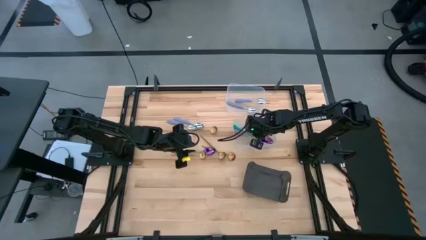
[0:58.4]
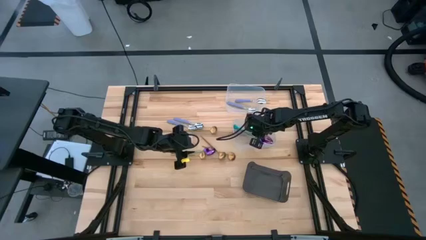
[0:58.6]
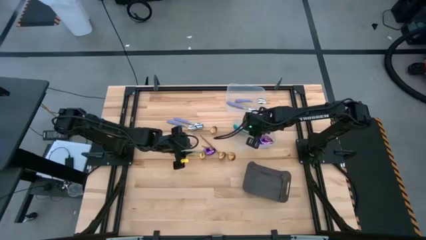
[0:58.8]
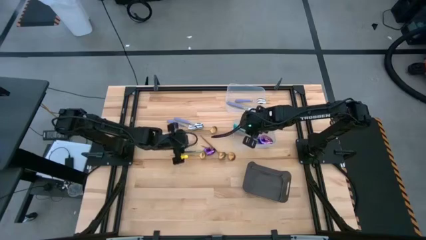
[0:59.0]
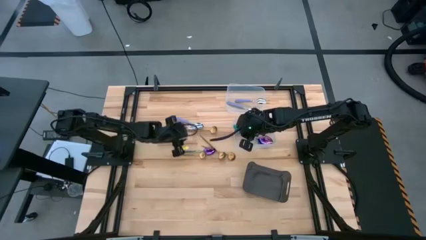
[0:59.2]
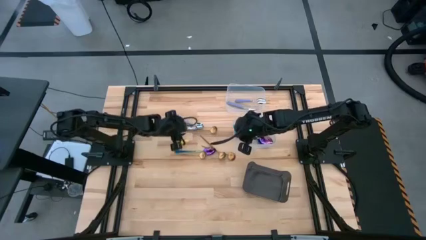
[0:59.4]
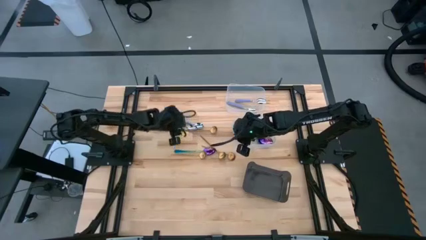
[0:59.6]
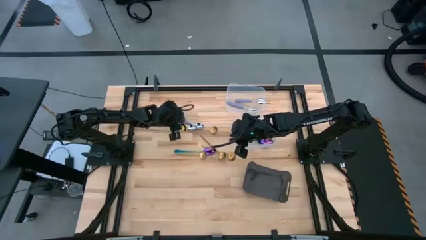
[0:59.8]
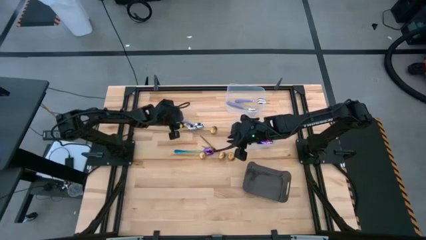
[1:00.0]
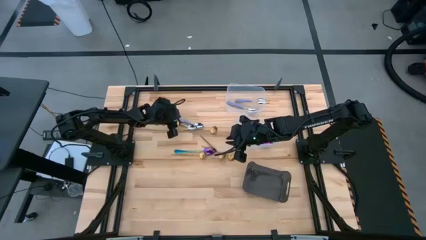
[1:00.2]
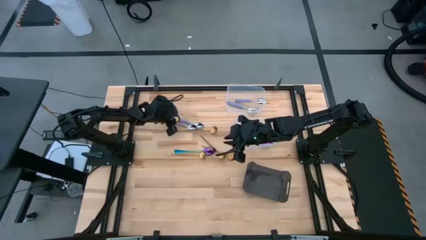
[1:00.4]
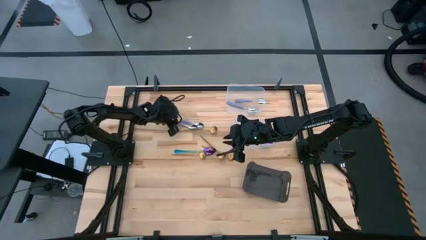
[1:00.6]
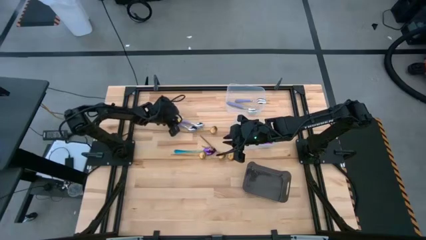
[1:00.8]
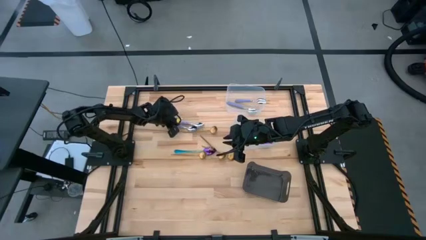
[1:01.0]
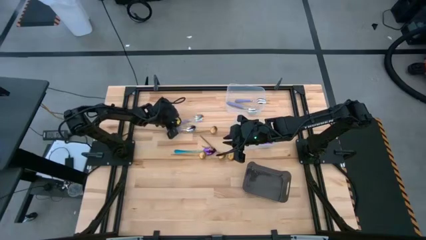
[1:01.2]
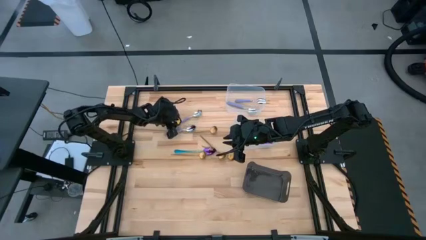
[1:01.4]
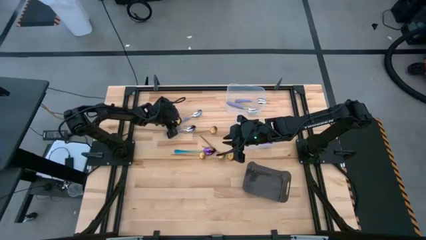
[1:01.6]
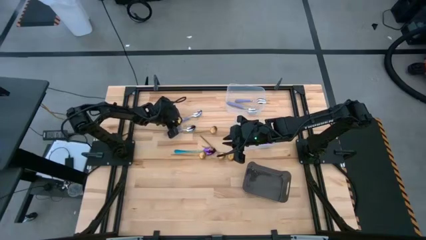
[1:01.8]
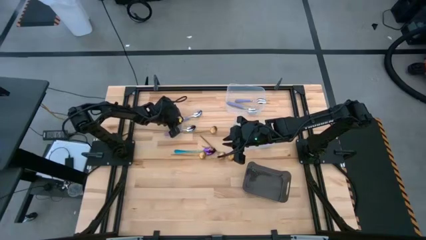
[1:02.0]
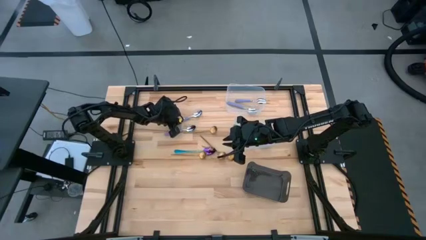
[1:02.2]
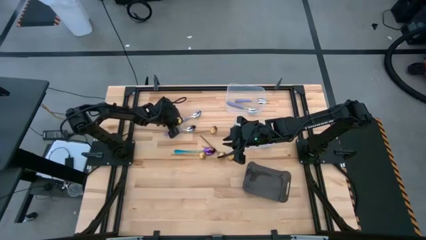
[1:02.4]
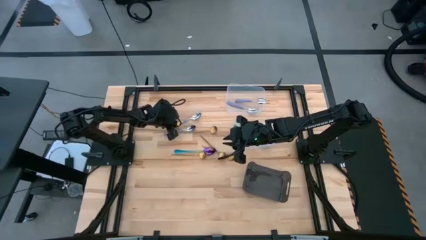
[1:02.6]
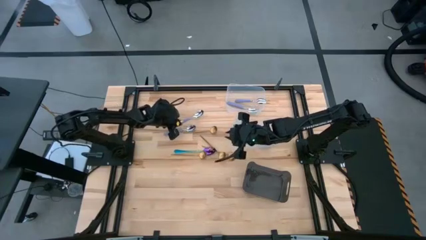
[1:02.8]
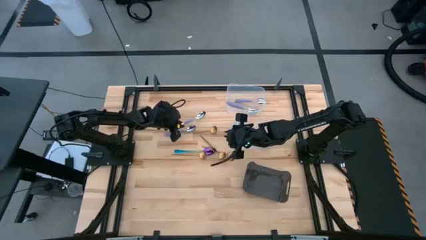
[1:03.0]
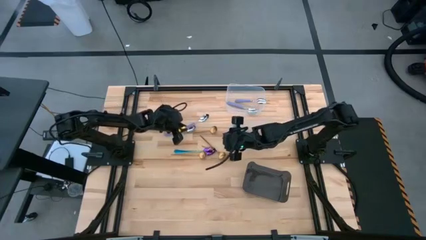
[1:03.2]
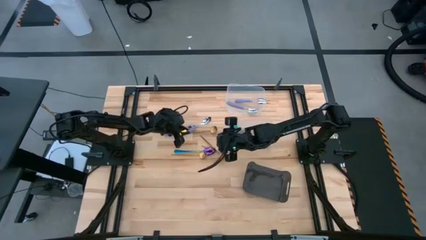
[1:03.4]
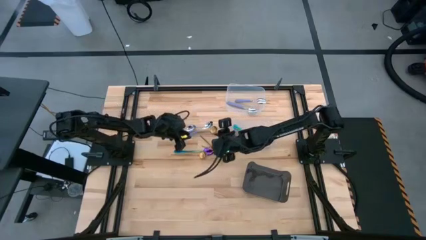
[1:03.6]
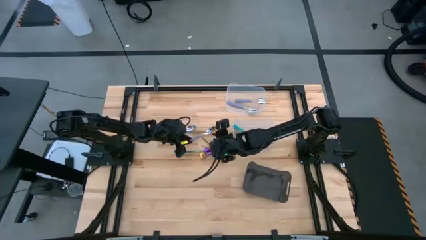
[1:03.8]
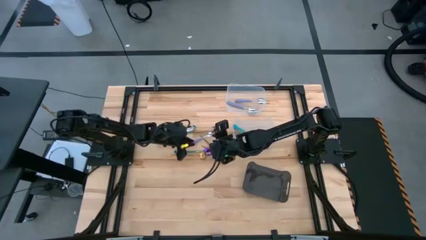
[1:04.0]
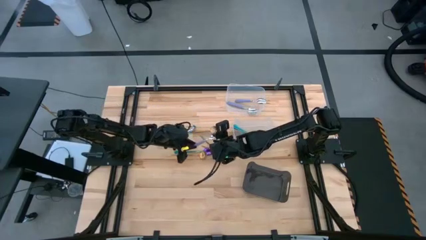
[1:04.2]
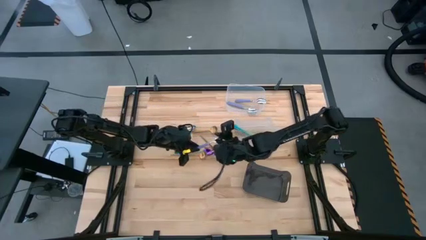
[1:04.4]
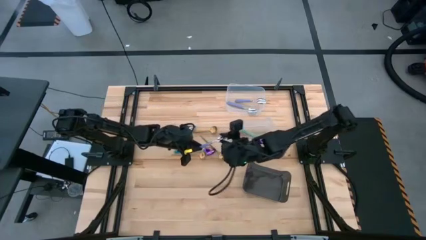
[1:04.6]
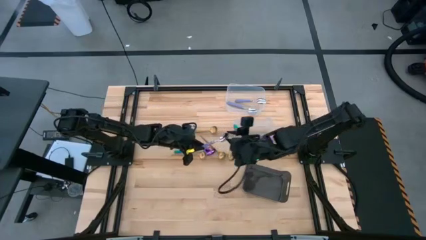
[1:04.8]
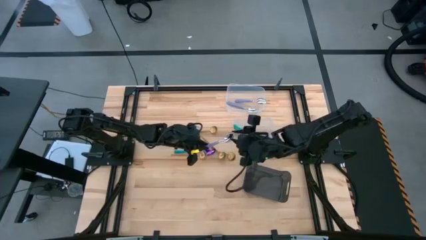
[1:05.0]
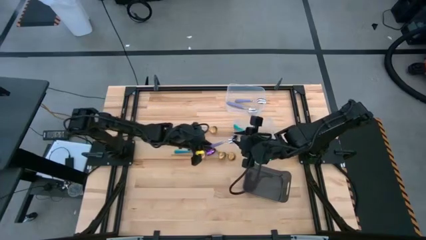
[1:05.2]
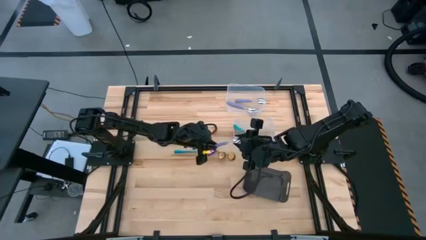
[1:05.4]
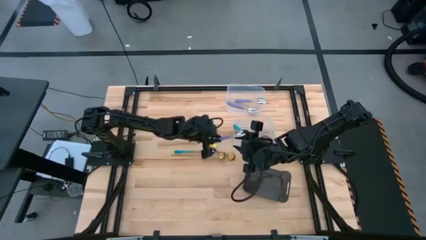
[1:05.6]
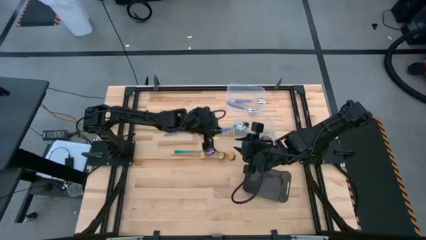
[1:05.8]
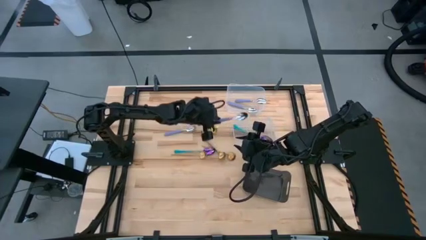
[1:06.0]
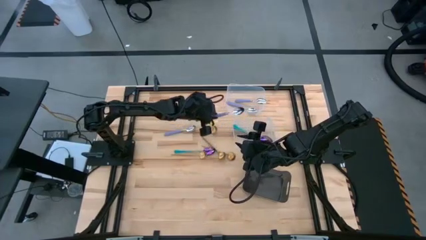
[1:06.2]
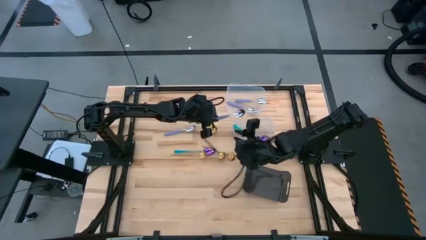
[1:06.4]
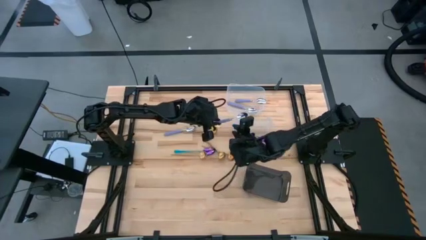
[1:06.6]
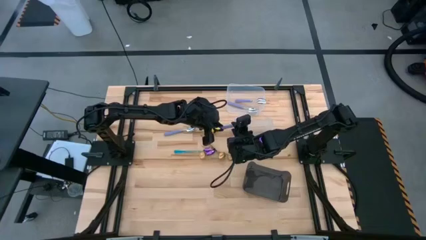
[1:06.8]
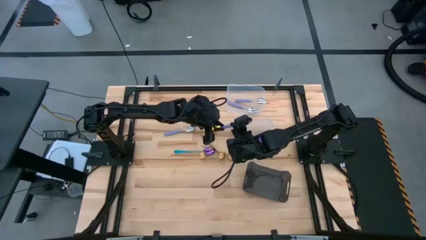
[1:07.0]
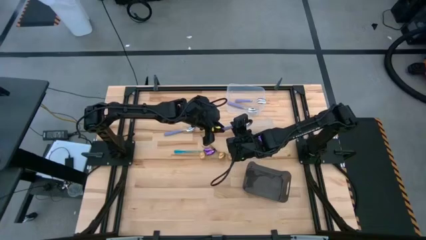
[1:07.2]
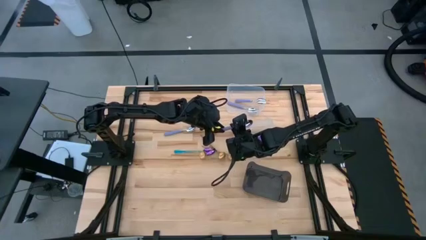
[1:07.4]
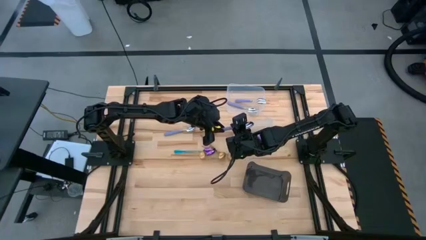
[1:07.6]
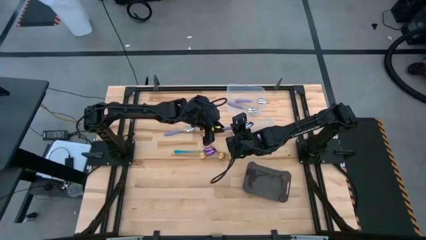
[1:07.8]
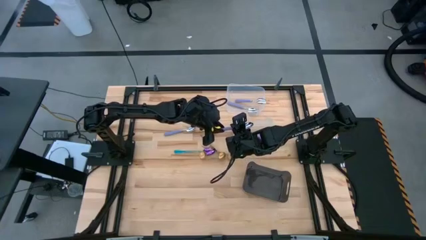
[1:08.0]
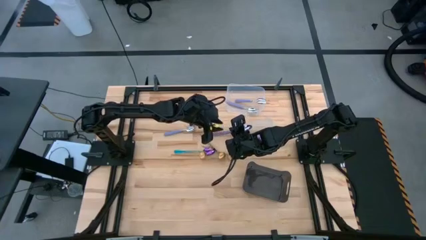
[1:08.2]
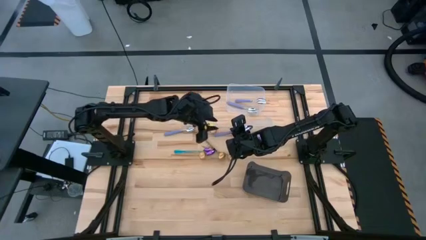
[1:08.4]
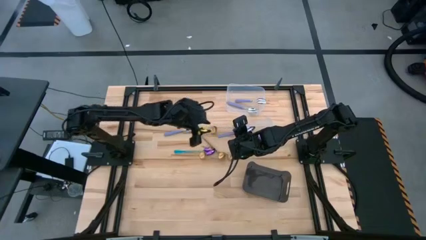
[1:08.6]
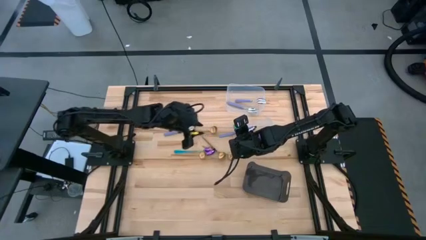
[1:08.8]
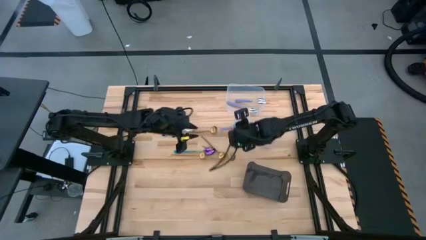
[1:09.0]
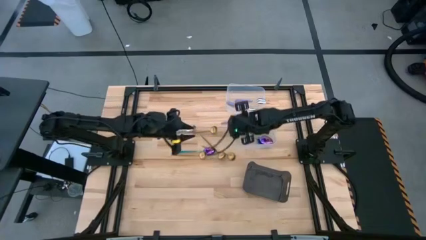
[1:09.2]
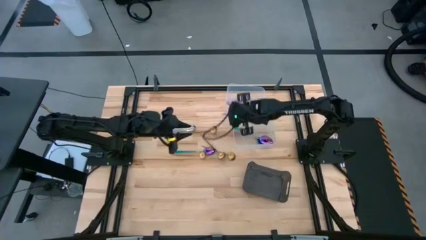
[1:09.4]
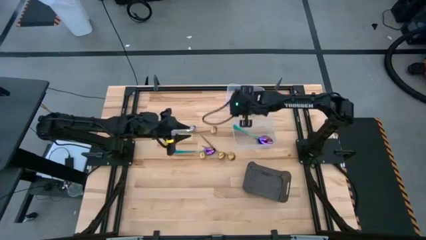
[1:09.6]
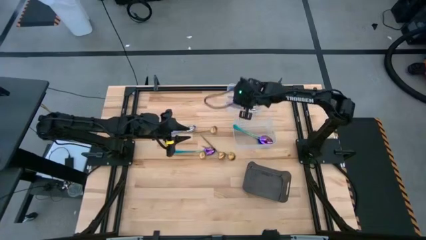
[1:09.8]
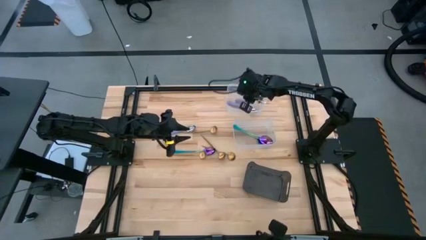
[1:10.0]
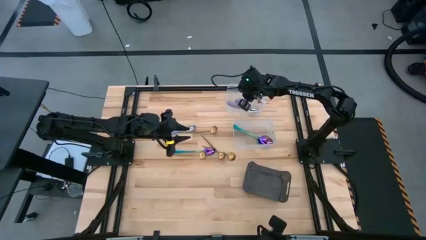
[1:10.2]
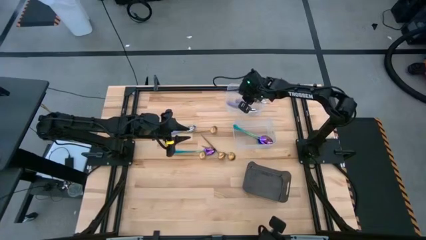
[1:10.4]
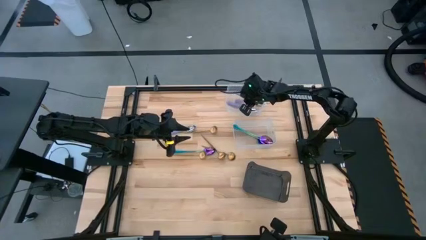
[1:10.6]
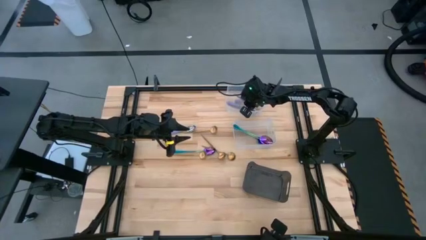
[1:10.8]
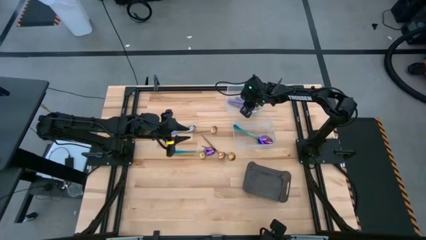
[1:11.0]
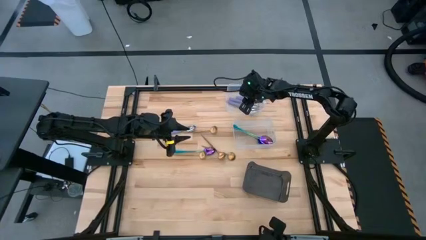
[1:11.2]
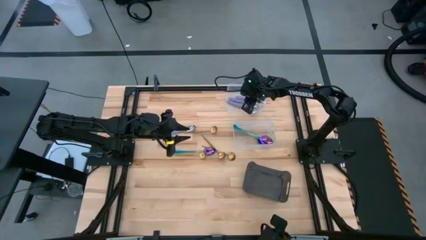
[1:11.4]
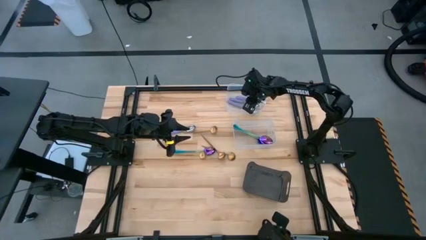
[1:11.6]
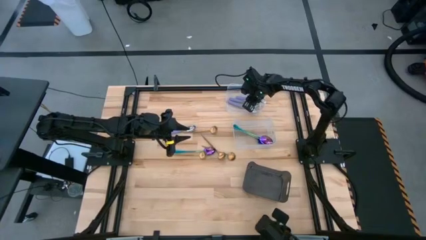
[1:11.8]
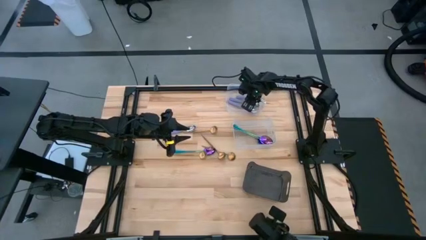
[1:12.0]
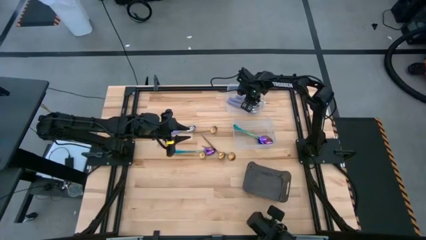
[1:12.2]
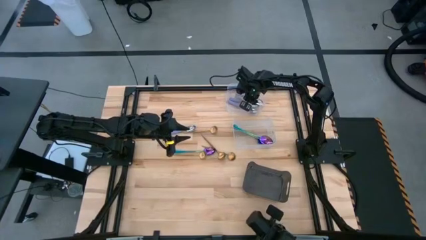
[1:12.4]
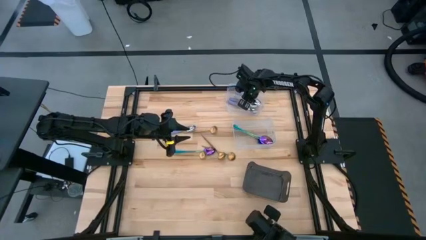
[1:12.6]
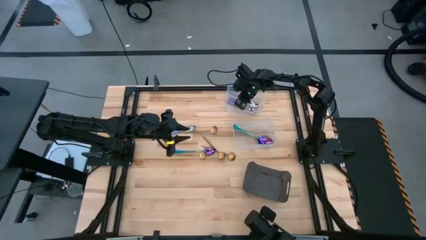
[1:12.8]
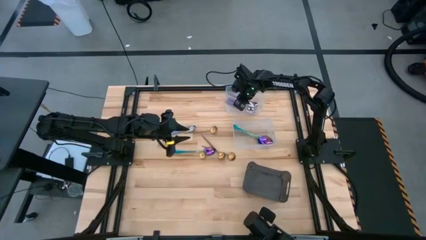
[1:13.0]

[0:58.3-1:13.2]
Task: Sort silverware by color (type)
Put the violet spoon into the top transparent bin

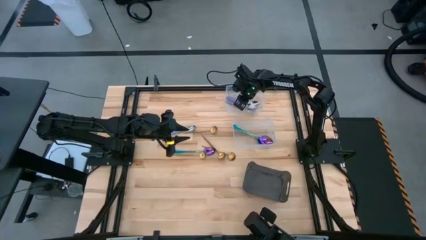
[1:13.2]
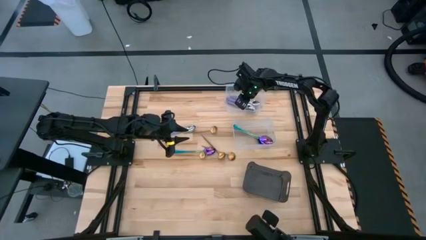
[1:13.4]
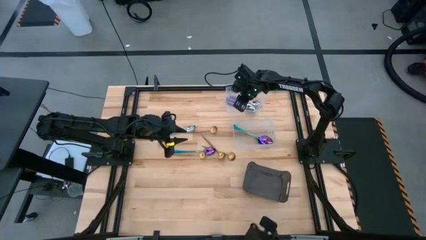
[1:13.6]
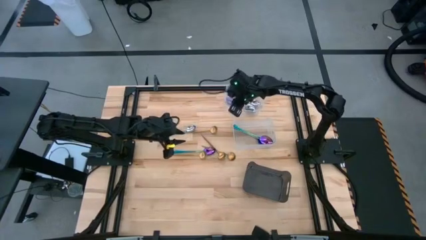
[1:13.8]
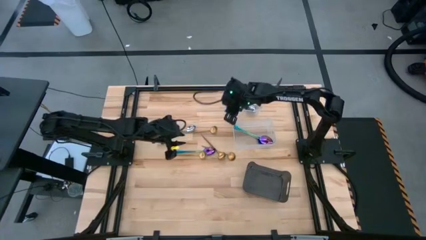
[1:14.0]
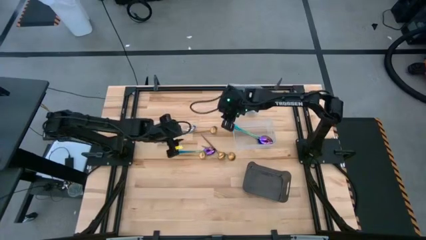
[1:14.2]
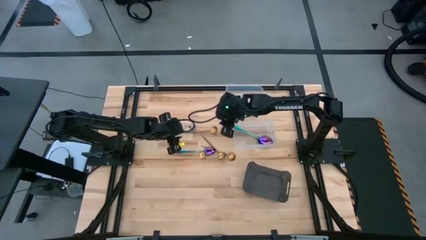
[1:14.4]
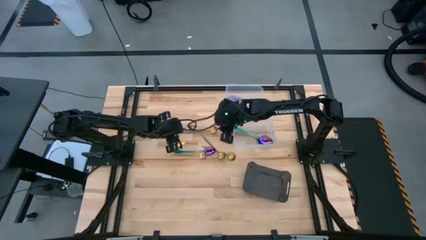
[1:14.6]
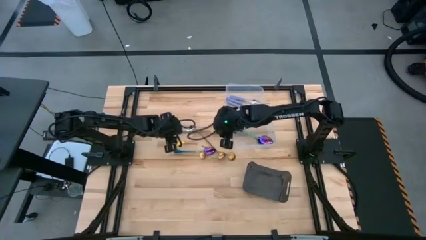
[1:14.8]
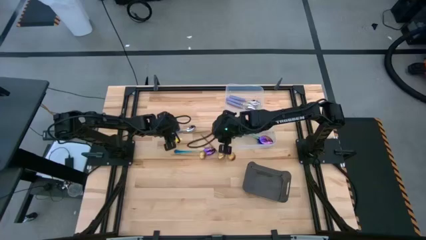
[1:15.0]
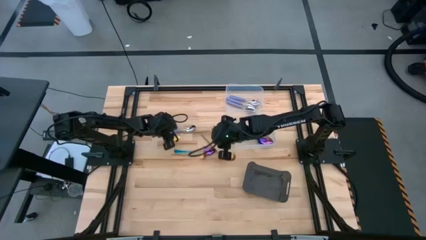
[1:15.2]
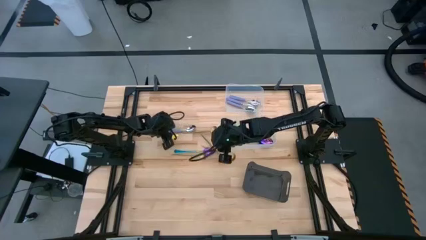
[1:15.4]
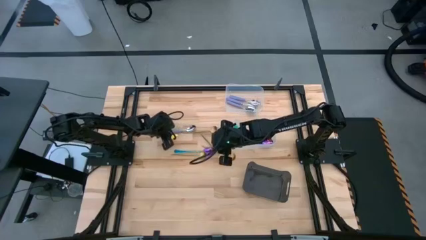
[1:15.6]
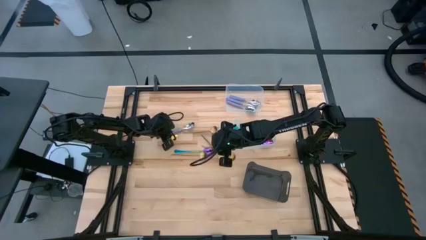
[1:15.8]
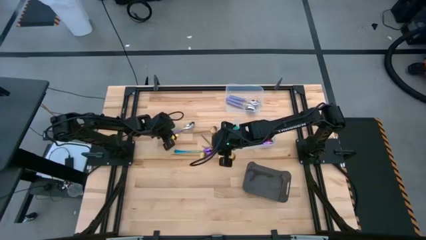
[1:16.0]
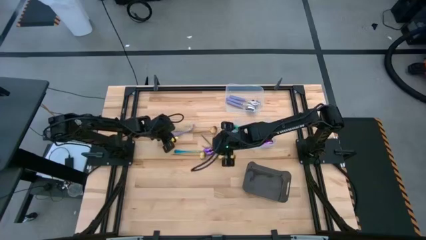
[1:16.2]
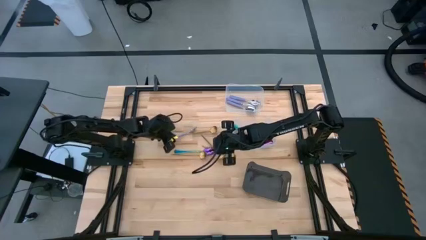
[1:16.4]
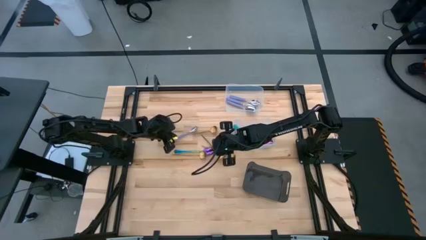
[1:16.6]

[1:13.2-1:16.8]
Put the violet spoon into the top transparent bin
